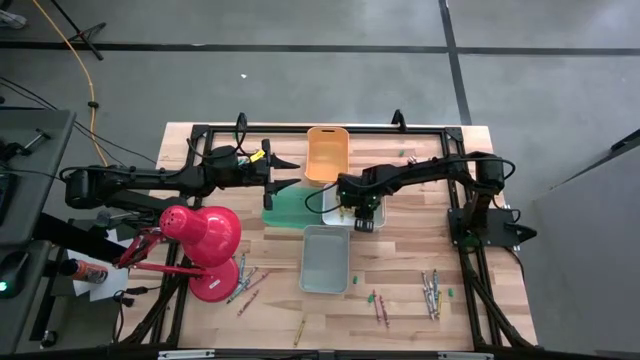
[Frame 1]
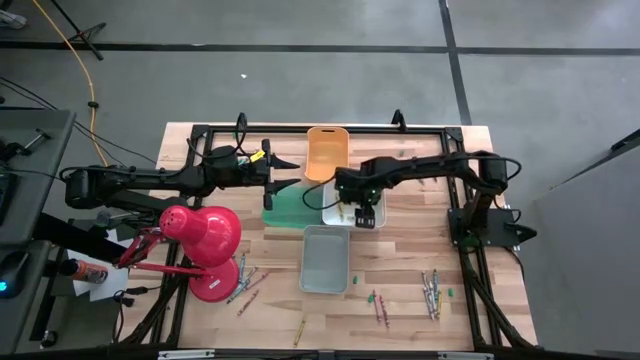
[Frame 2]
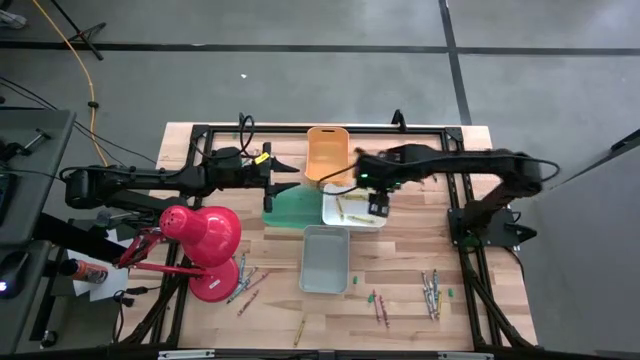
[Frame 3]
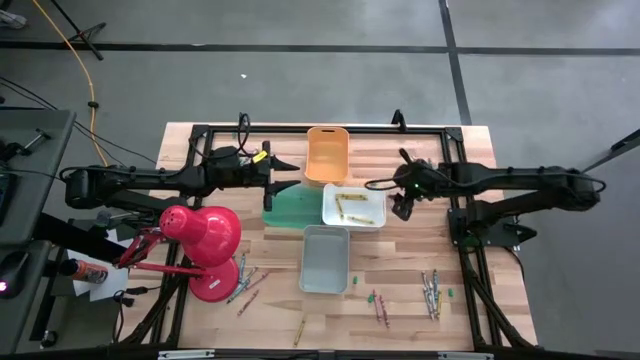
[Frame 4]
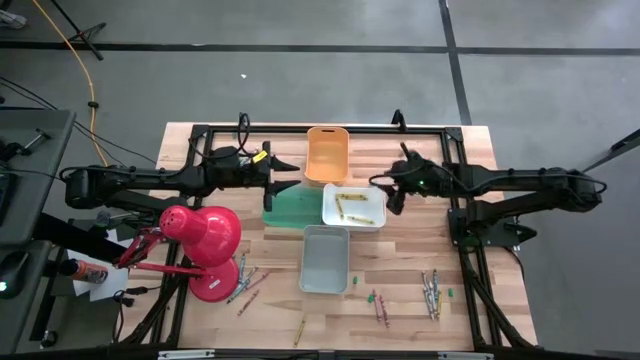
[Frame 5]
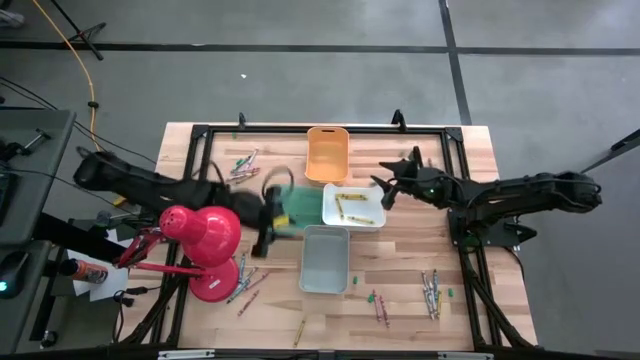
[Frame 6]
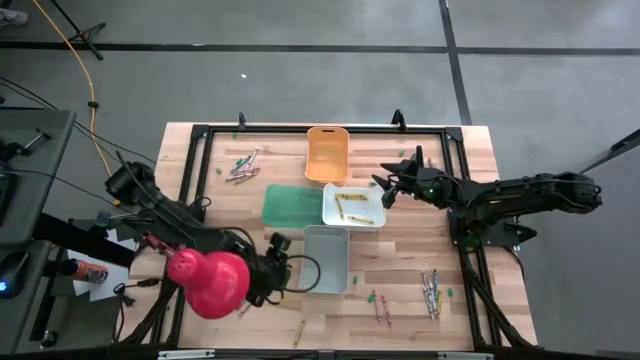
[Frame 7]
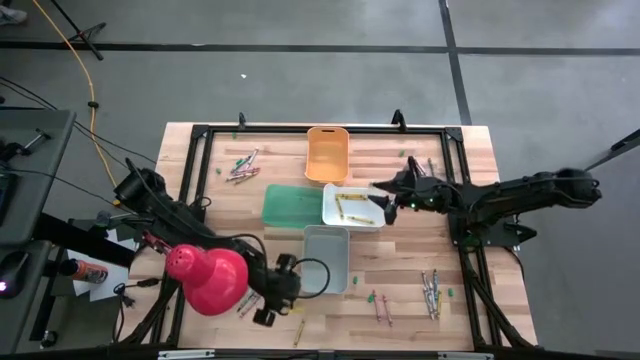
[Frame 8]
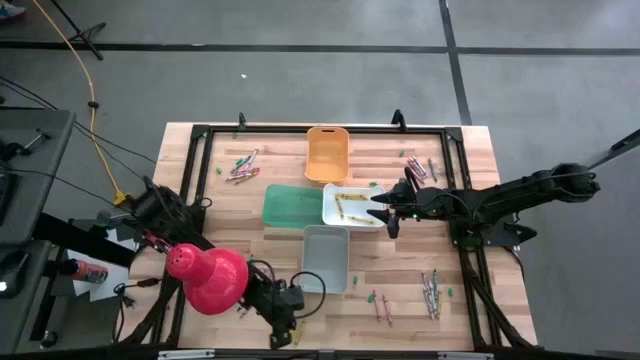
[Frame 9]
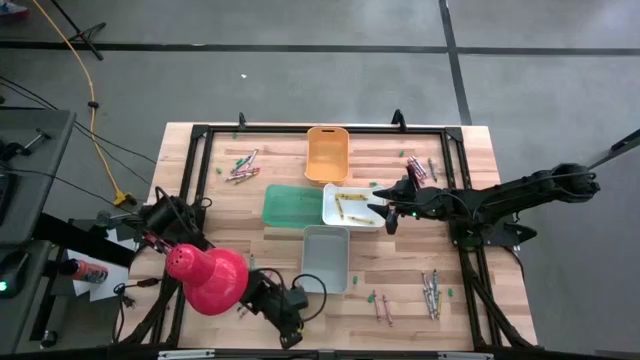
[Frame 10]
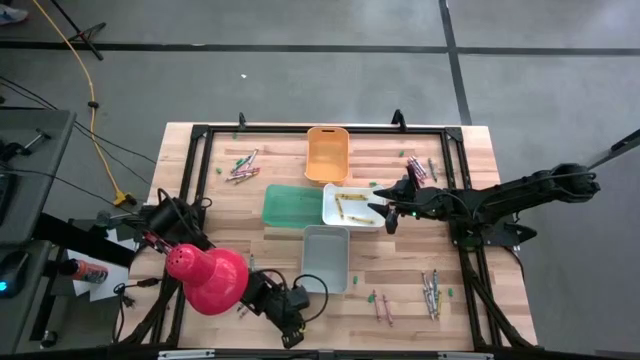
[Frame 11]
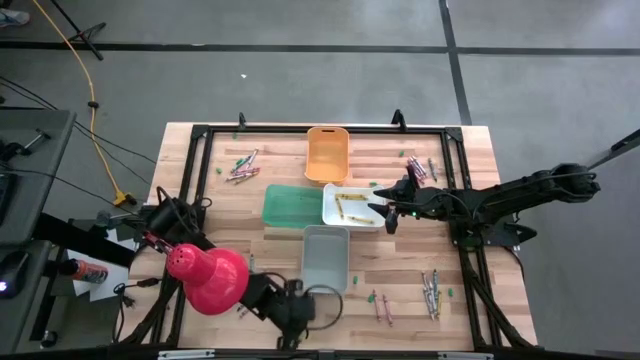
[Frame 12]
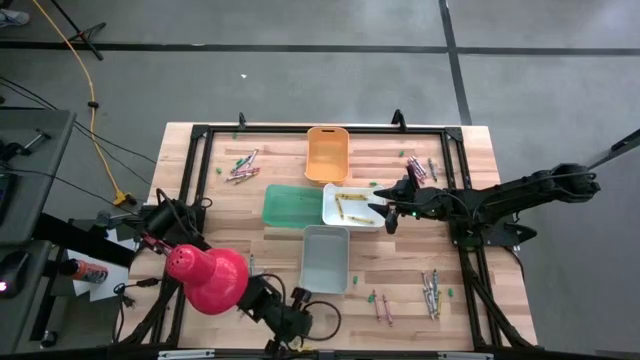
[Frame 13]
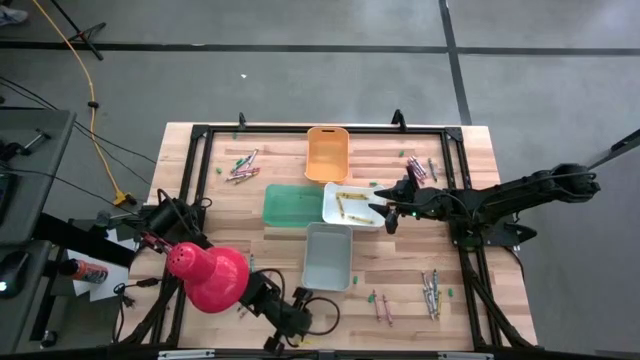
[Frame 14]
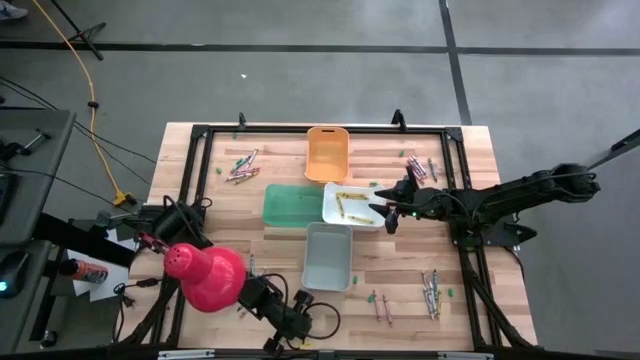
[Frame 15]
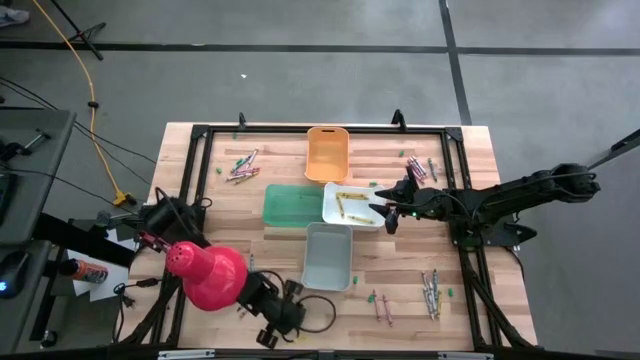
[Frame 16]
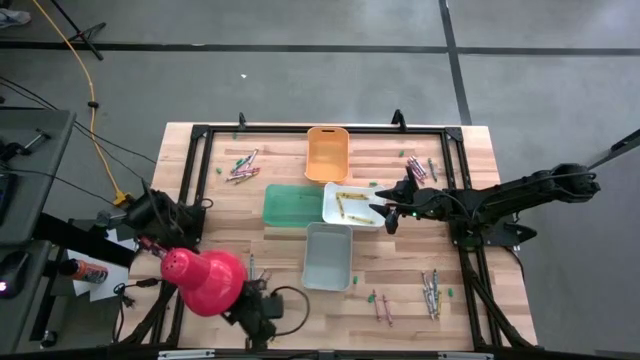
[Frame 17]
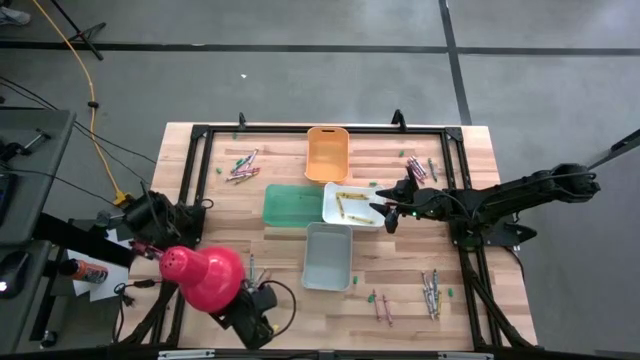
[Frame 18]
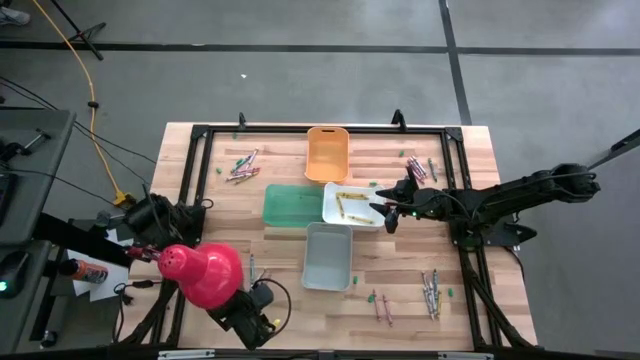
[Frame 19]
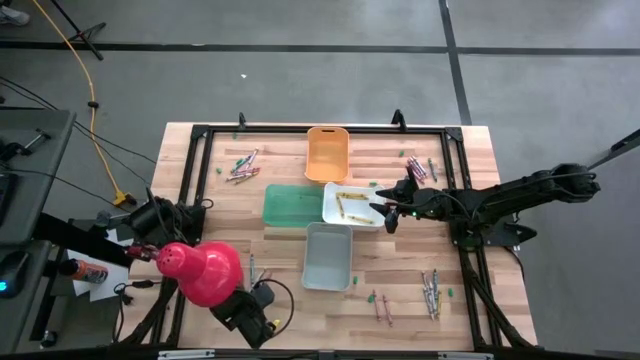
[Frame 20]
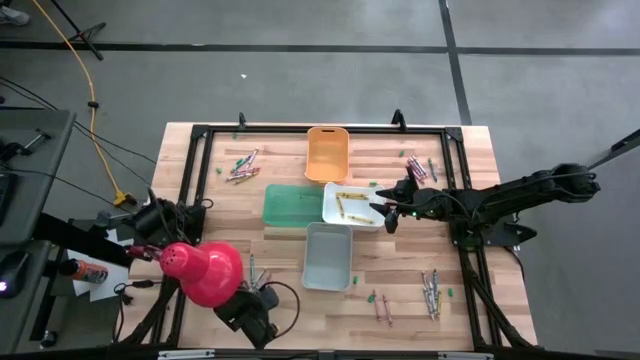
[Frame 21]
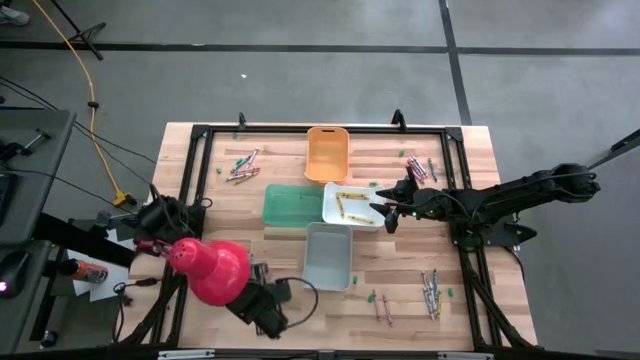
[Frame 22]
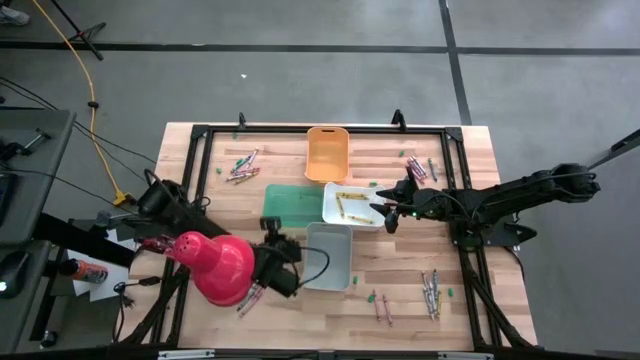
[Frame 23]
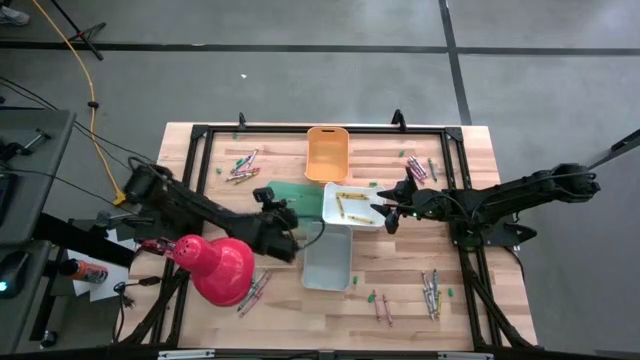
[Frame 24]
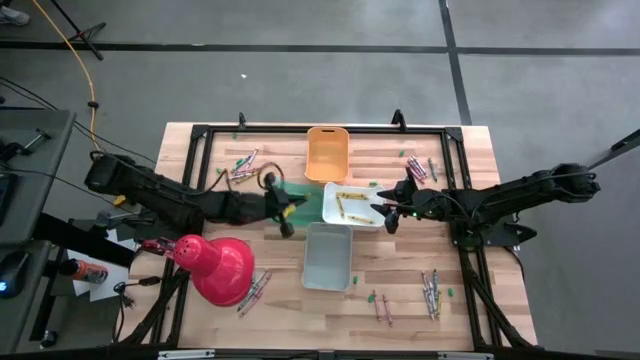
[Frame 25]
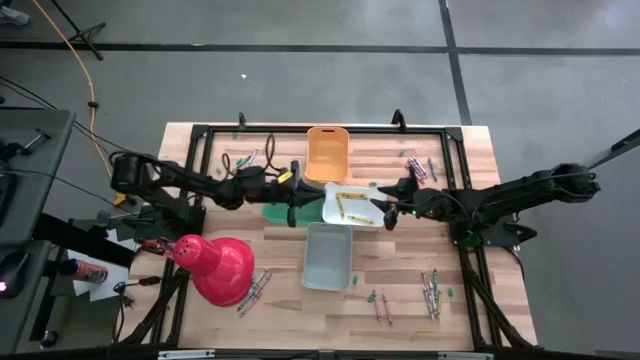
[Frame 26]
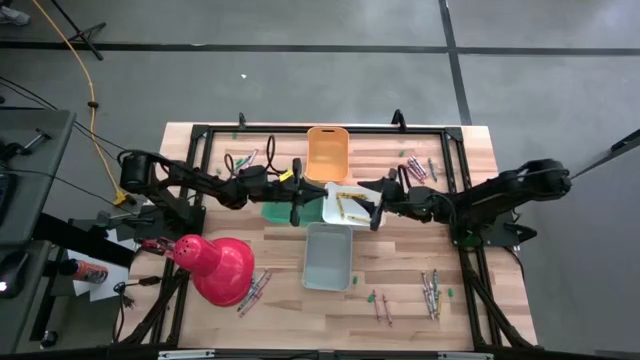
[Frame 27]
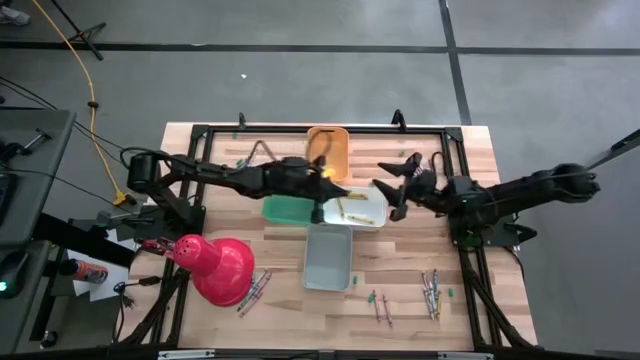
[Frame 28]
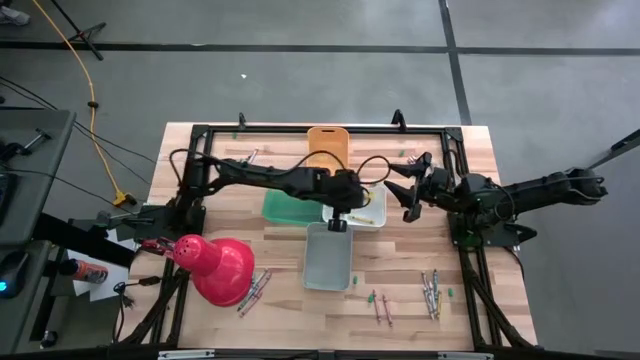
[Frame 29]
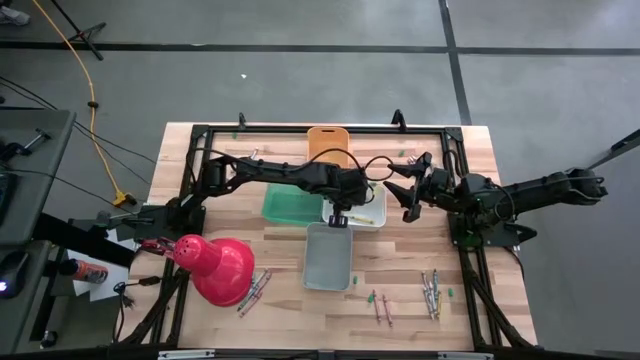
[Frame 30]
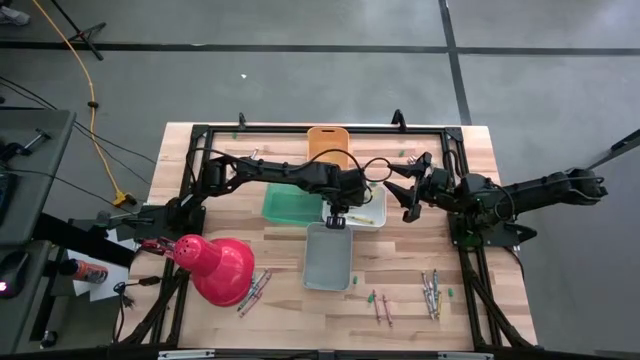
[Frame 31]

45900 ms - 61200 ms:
Task: Sort crayons
Put the yellow crayon into the white bin

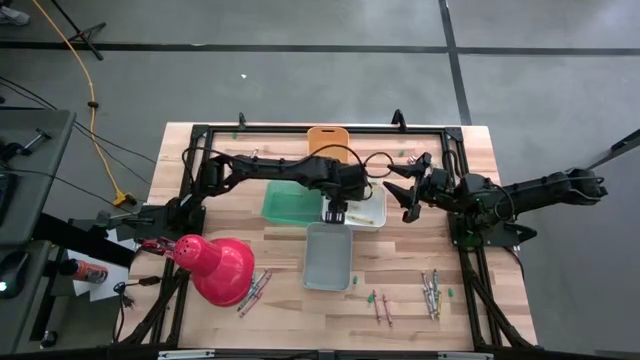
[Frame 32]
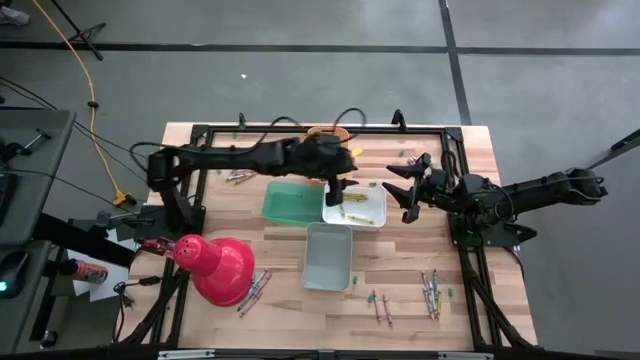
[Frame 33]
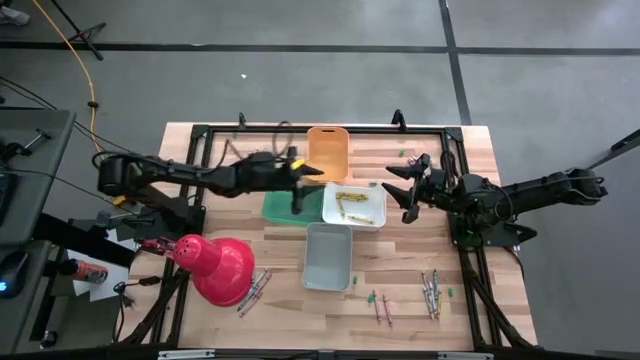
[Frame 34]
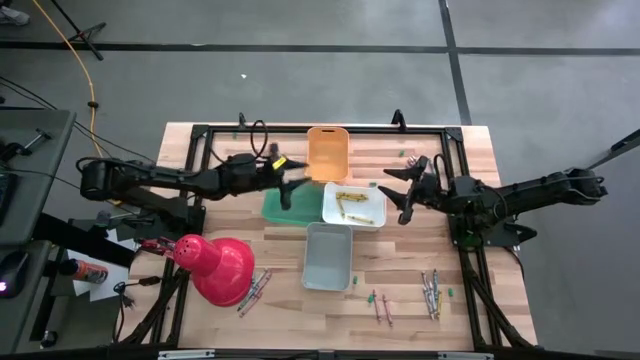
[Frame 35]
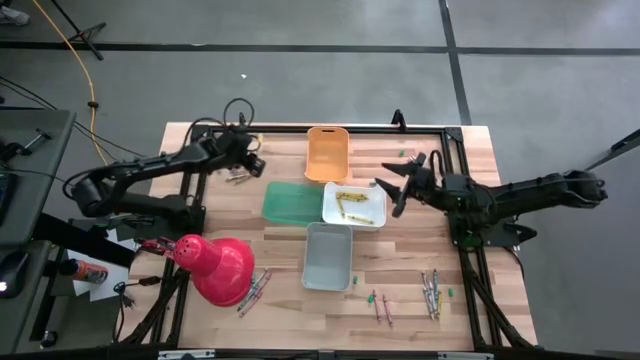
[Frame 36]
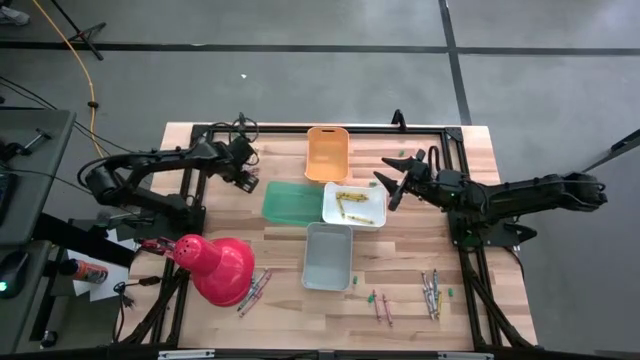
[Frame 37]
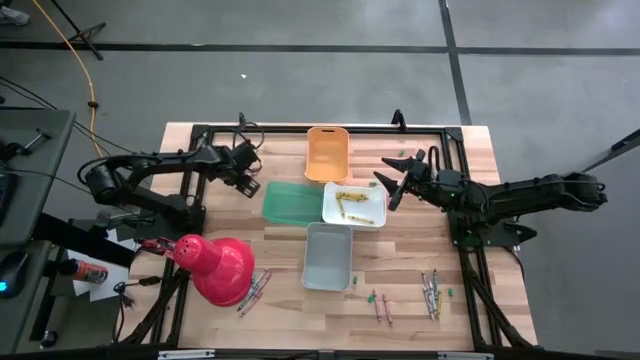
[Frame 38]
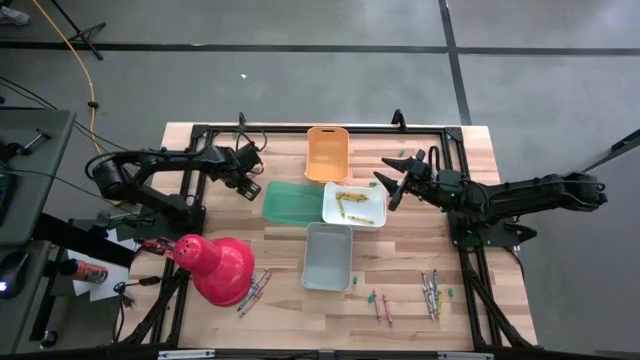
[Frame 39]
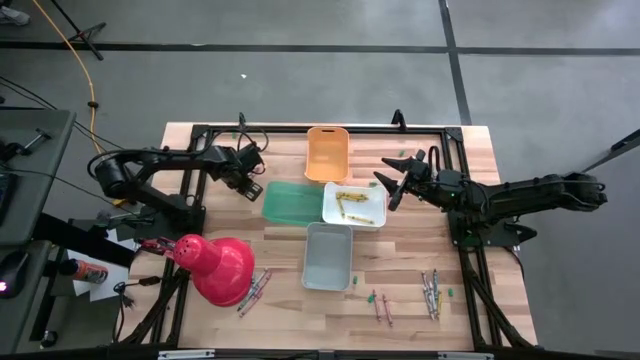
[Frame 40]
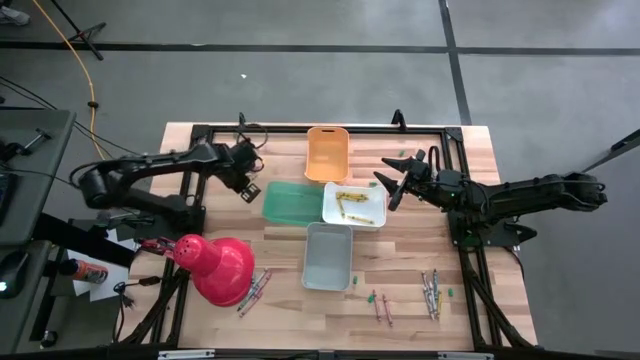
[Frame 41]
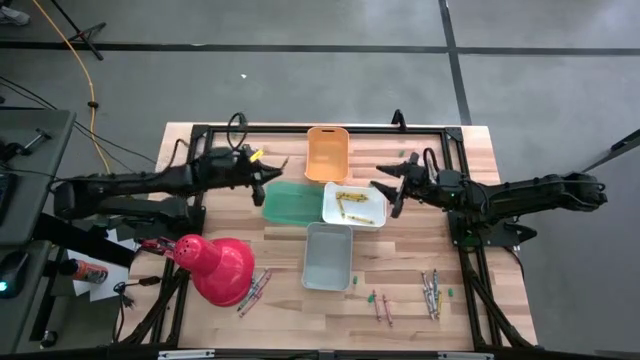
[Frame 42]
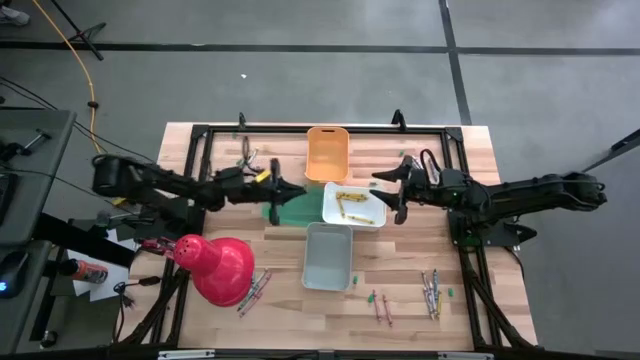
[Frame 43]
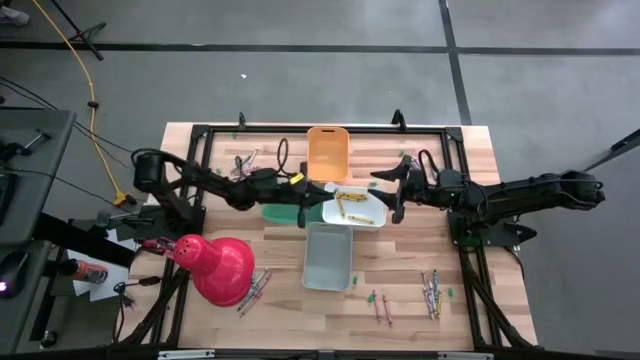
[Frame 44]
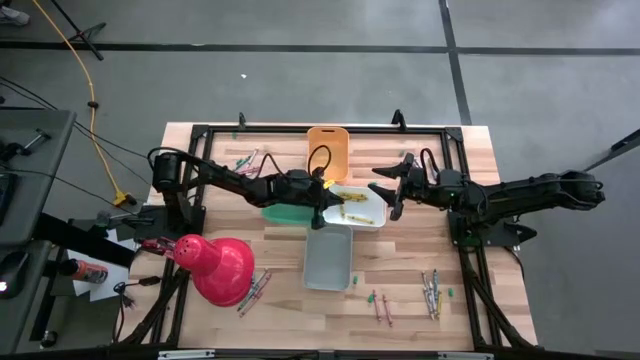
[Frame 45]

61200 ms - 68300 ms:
Put the yellow crayon into the white bin
